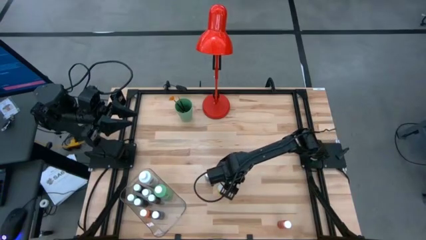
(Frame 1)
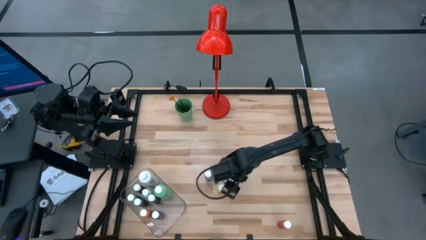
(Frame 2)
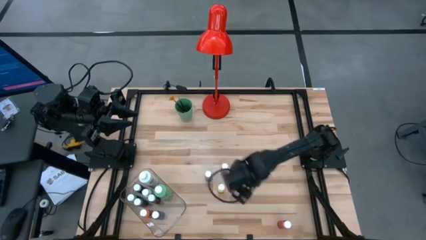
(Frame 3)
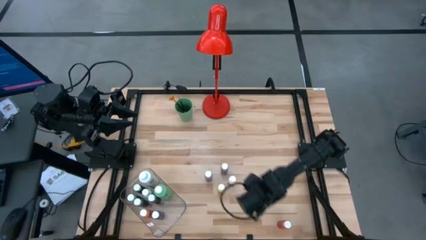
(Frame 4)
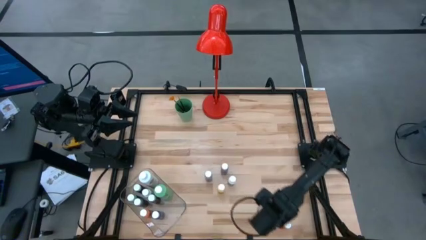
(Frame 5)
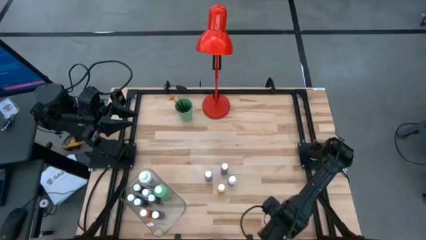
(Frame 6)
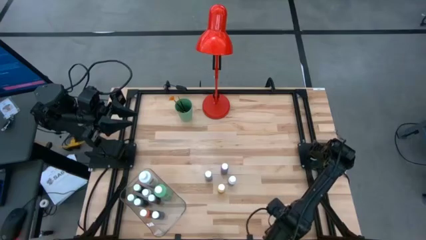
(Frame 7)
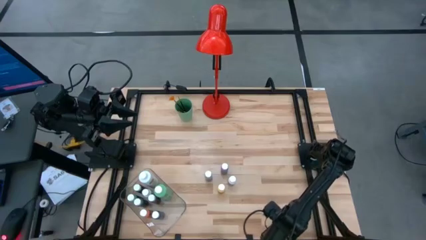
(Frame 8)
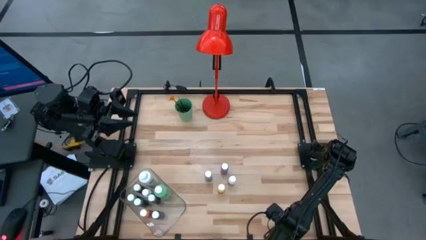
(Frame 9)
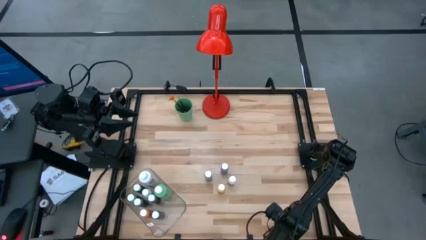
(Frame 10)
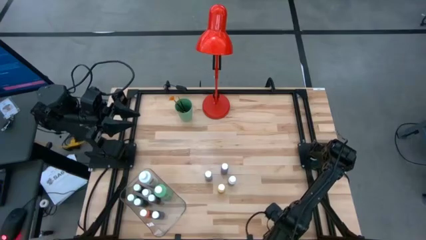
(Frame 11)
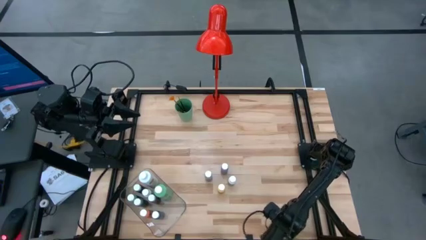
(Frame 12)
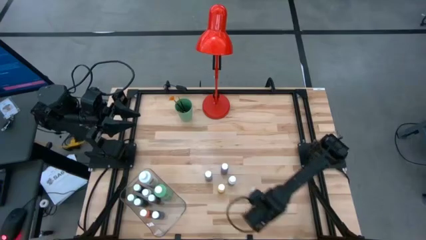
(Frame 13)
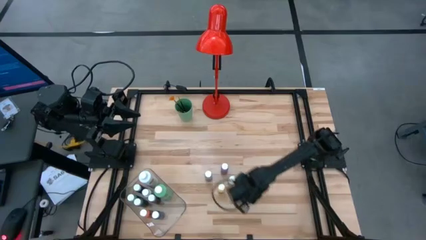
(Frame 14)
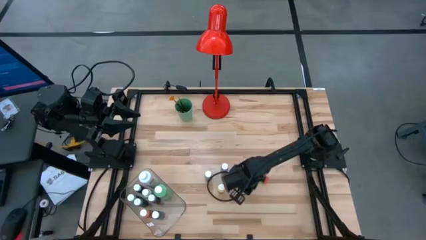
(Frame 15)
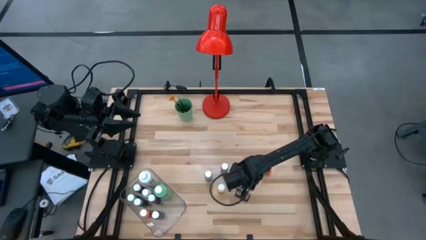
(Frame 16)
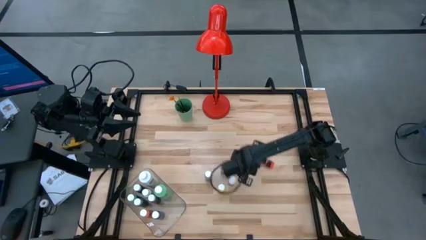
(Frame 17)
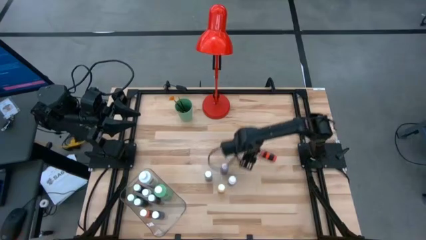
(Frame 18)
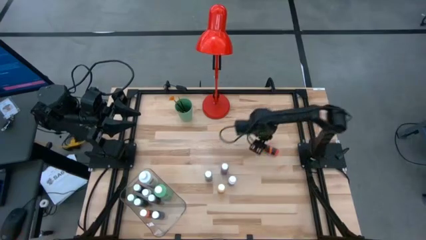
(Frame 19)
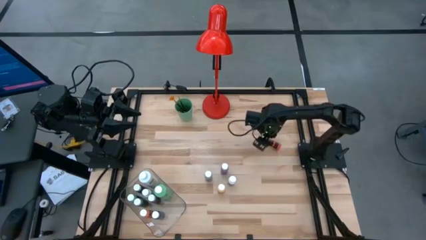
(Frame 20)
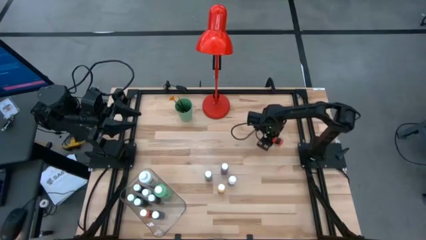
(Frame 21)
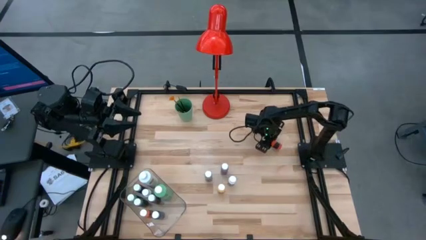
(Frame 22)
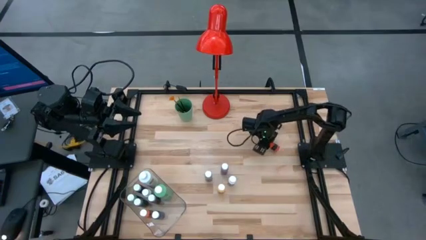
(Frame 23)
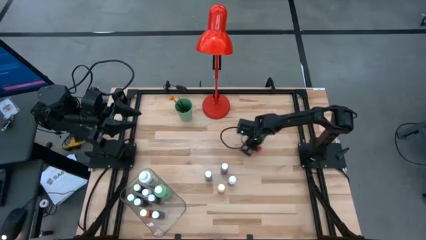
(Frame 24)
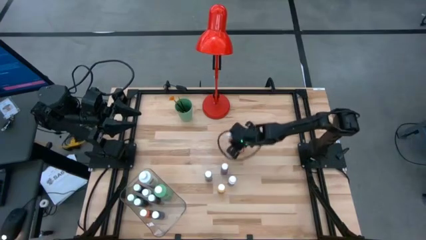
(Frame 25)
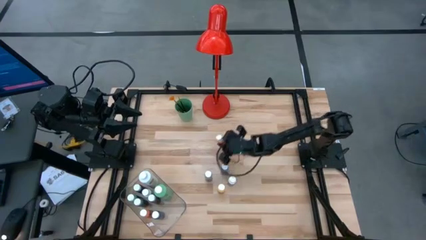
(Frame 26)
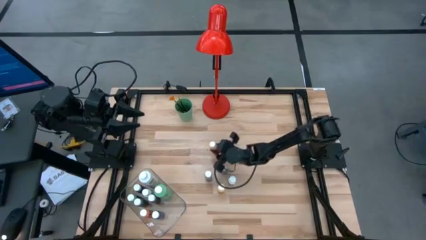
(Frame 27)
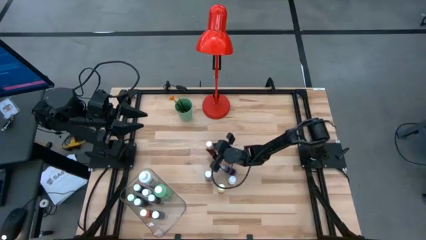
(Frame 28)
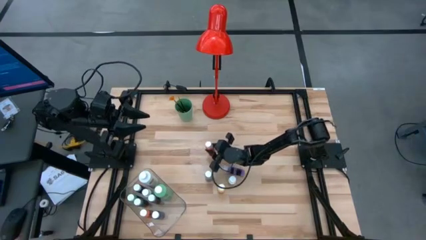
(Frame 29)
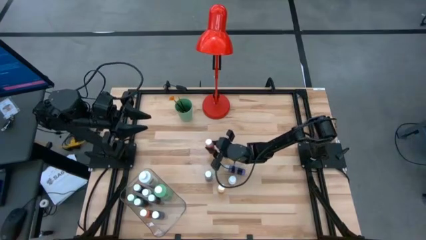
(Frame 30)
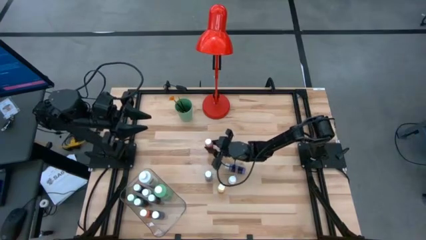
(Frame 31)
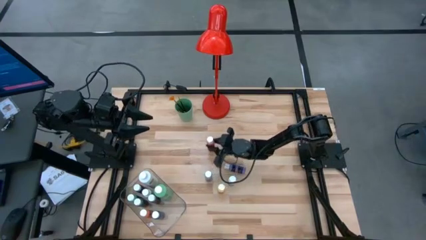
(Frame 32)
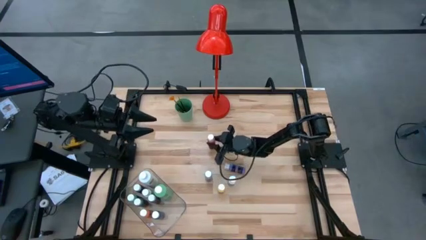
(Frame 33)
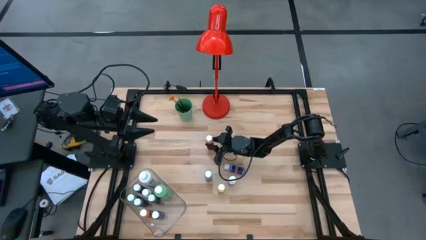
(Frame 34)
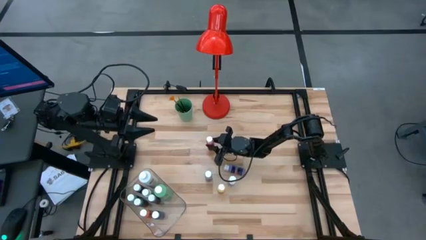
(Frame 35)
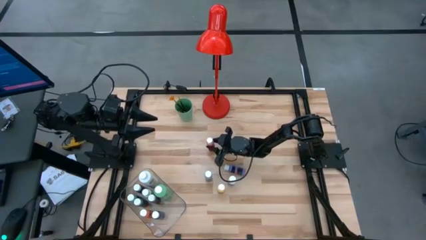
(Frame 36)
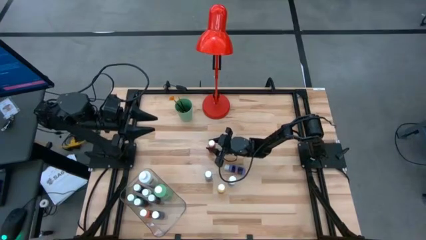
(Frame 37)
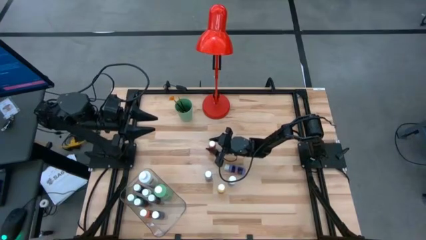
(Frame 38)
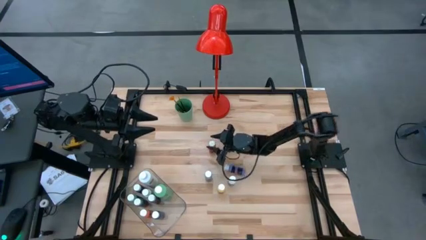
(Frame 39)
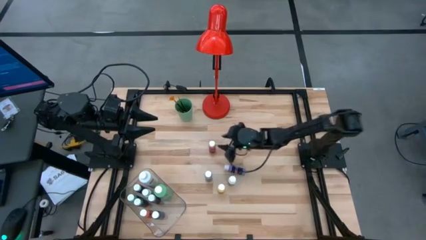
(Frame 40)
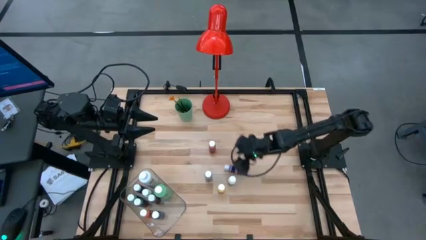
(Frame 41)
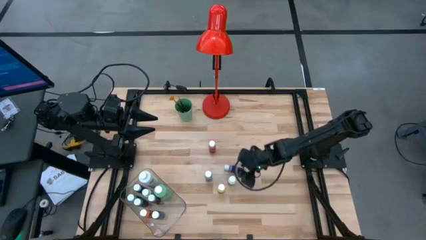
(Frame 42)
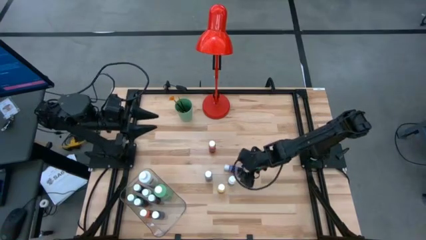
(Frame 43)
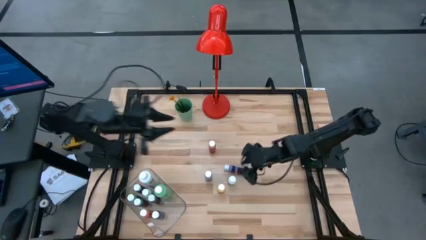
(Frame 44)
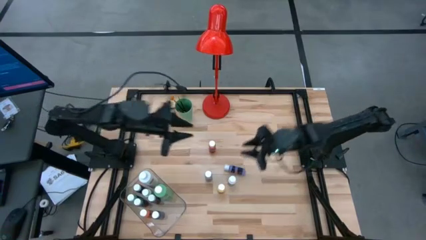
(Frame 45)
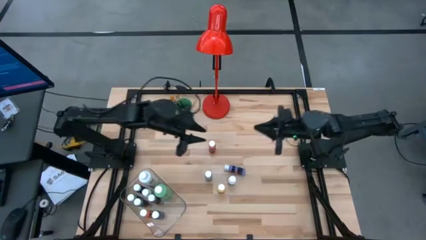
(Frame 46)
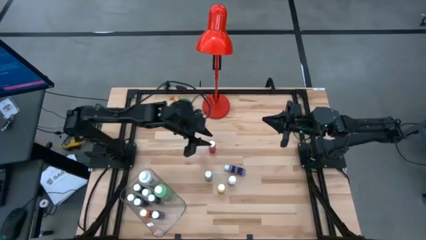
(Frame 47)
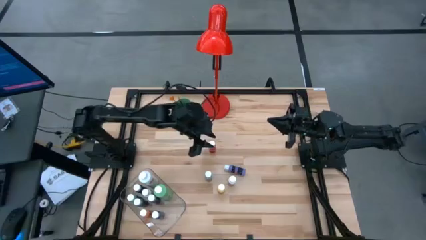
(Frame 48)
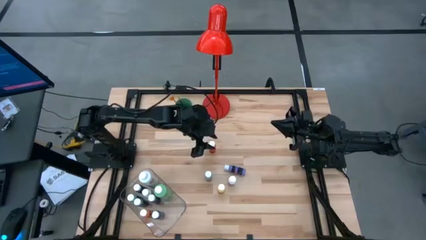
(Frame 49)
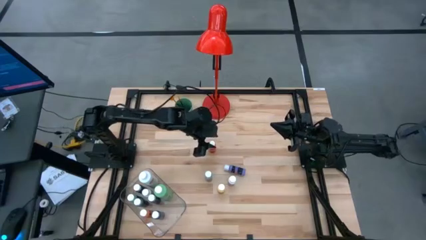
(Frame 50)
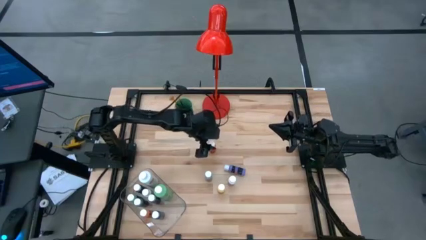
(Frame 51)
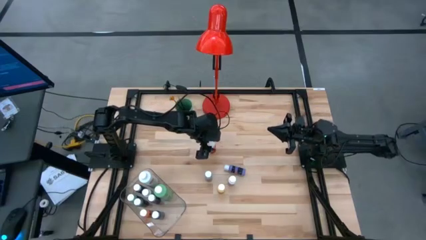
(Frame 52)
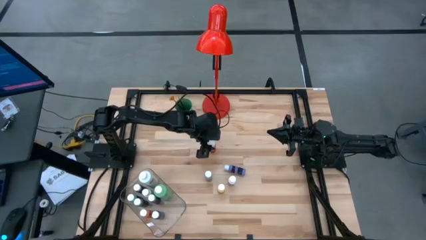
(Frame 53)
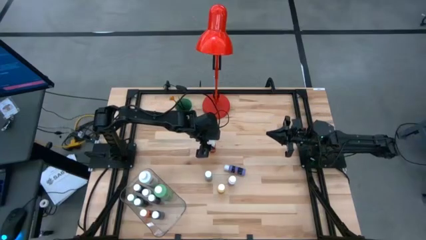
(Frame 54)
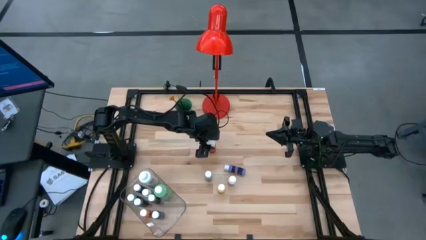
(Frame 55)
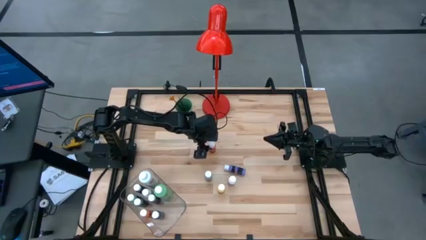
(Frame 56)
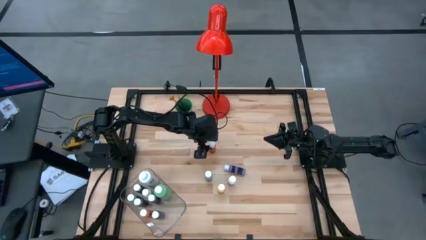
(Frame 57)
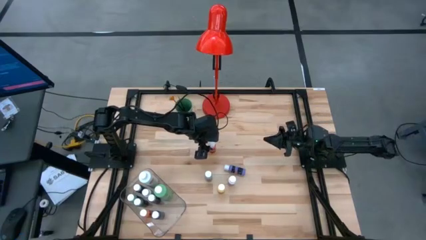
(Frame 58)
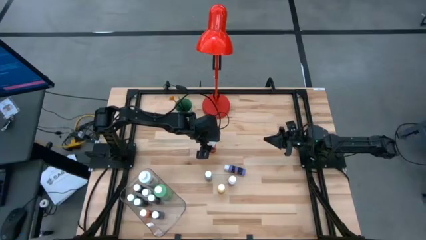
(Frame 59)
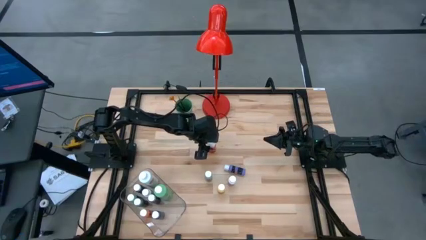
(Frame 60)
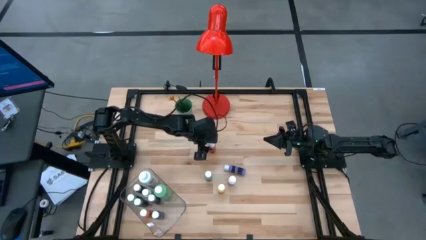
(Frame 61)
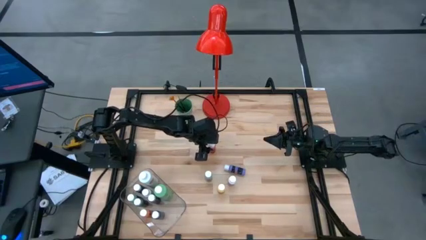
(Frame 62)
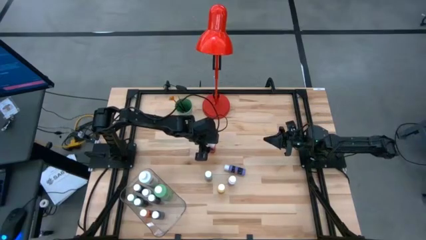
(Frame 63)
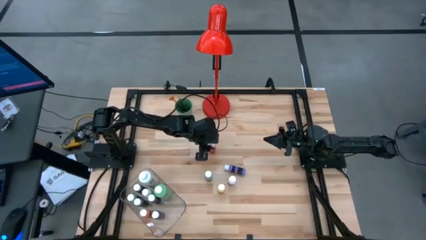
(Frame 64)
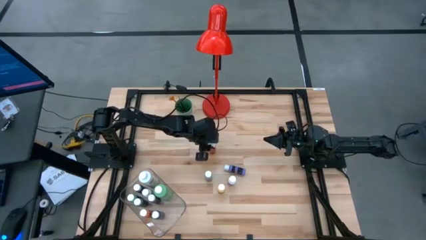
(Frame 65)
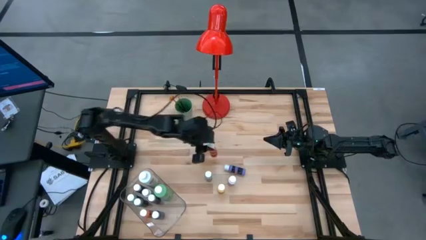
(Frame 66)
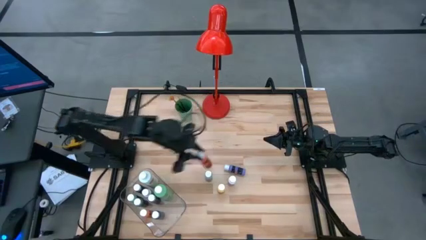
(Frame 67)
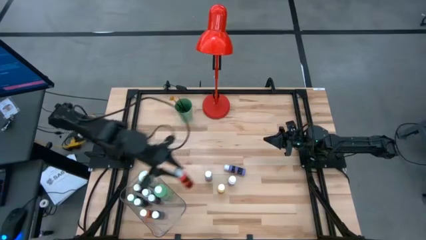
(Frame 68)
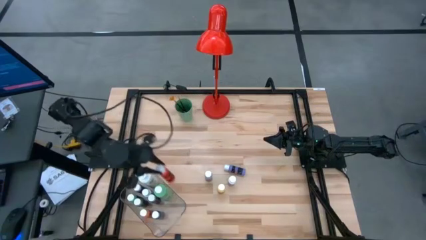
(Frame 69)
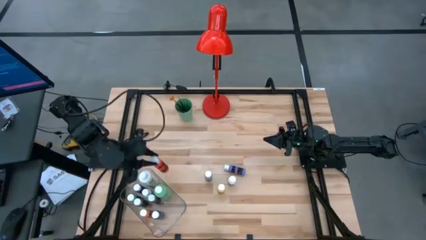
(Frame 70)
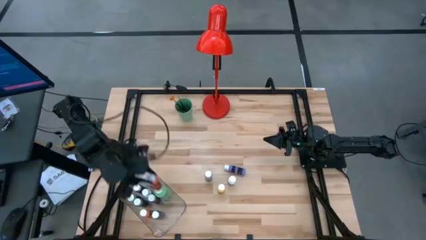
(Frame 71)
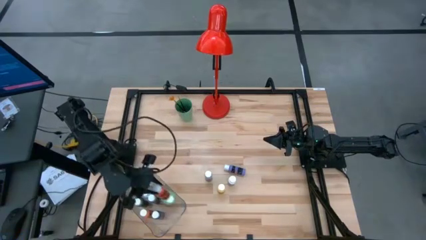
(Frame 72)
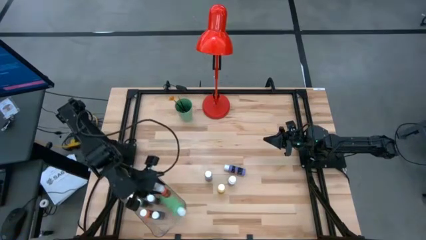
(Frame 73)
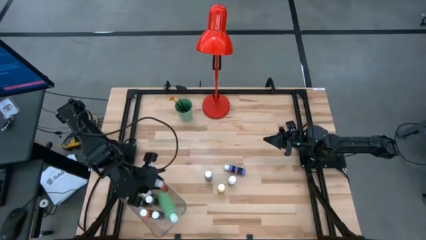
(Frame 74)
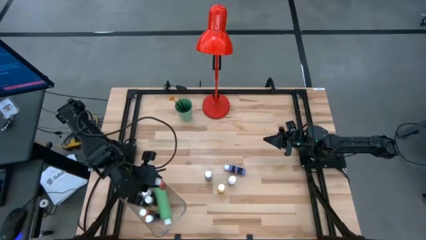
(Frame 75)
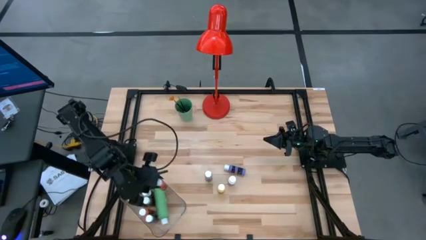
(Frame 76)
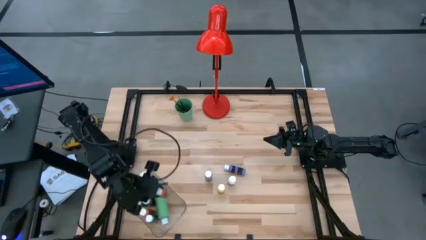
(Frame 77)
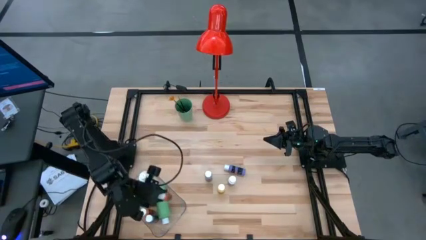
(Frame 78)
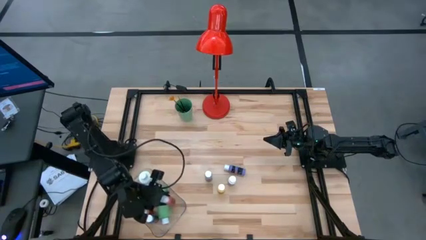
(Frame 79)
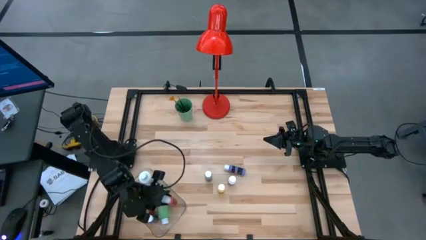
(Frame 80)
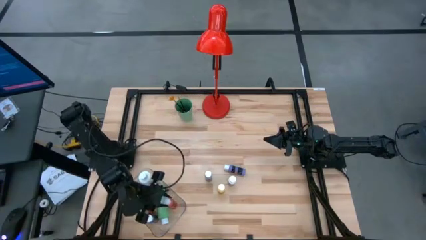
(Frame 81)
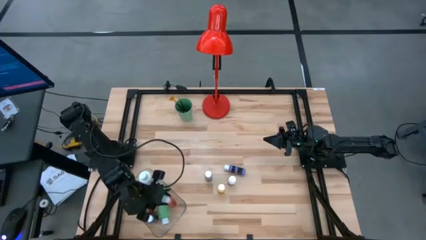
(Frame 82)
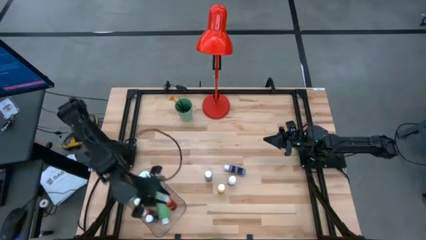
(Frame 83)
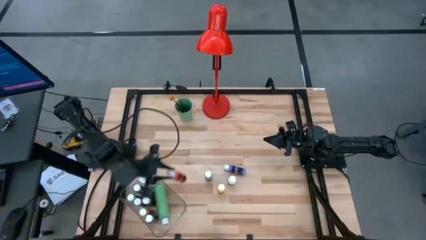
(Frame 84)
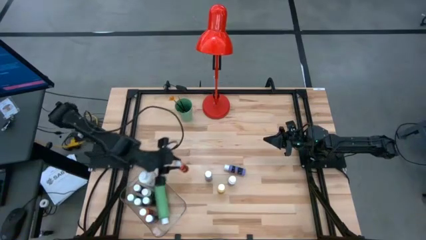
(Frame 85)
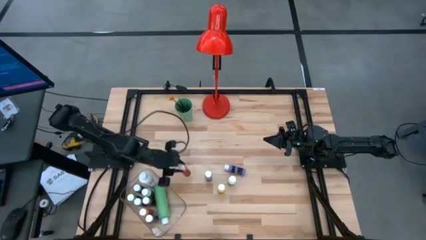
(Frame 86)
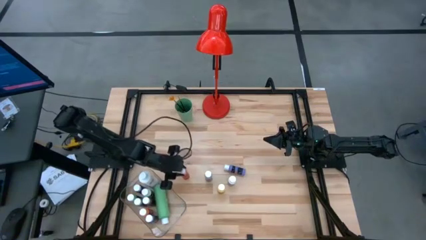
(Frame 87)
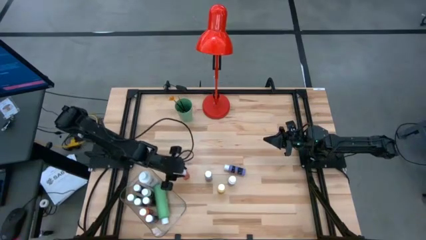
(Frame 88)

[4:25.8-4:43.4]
Task: Pick & Place Paint Supplies
Put the orange coloring bottle into the transparent bin
